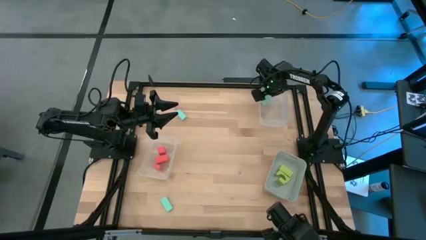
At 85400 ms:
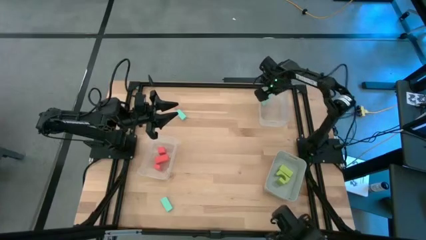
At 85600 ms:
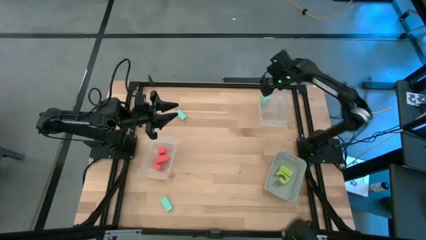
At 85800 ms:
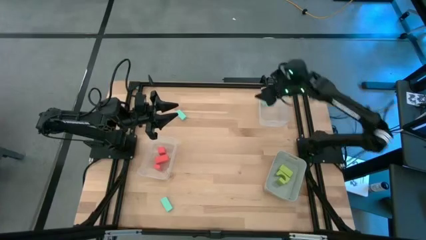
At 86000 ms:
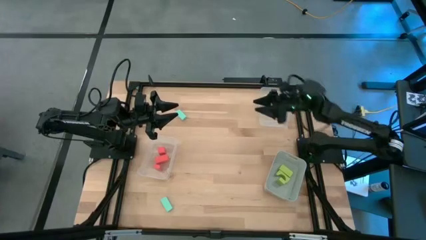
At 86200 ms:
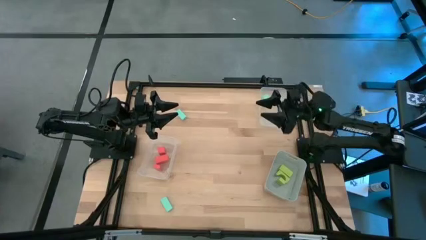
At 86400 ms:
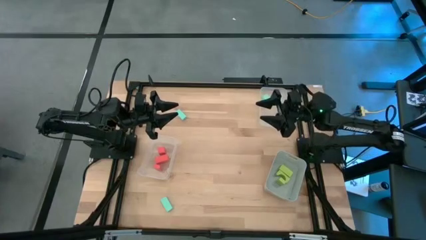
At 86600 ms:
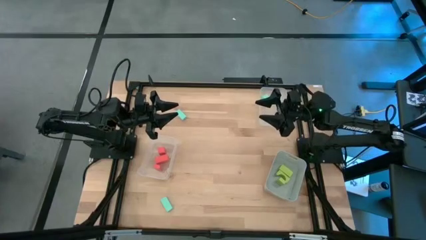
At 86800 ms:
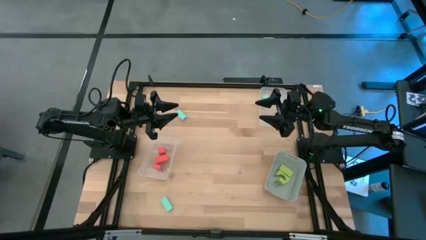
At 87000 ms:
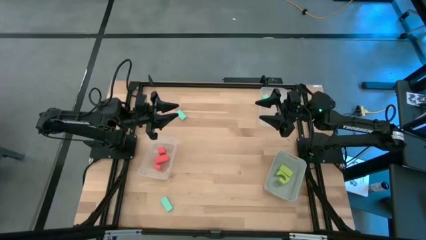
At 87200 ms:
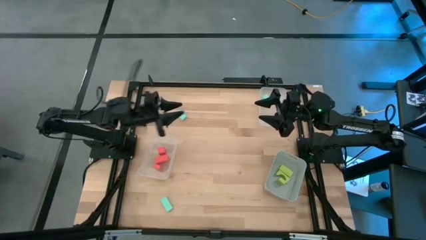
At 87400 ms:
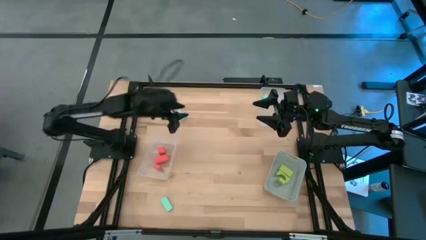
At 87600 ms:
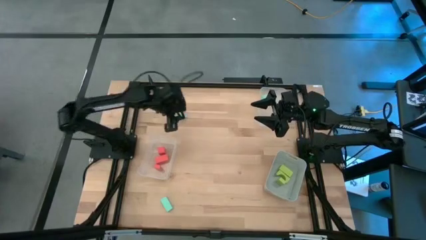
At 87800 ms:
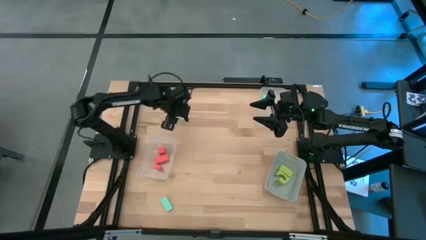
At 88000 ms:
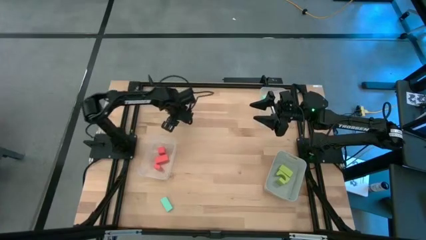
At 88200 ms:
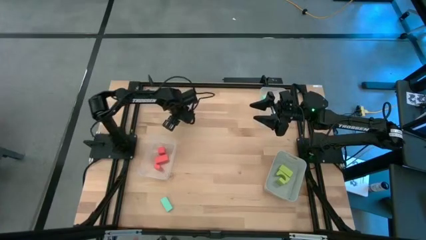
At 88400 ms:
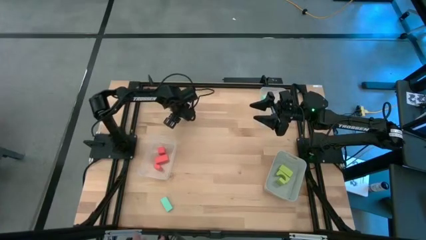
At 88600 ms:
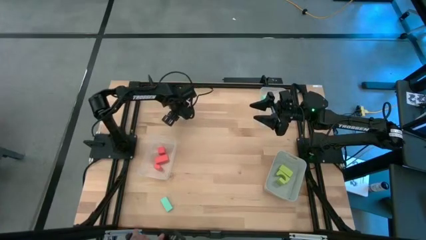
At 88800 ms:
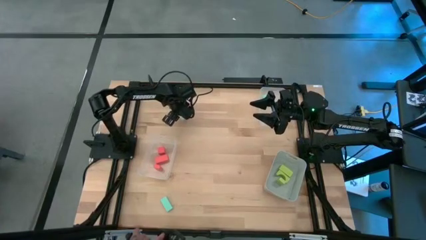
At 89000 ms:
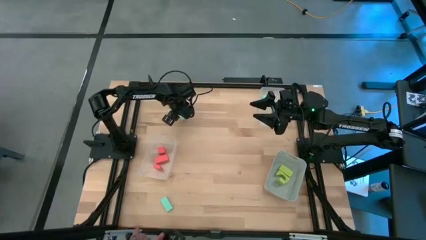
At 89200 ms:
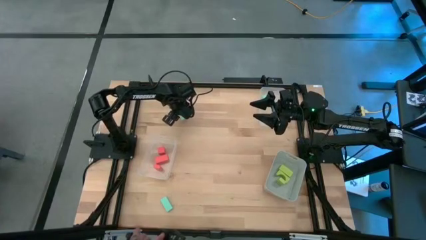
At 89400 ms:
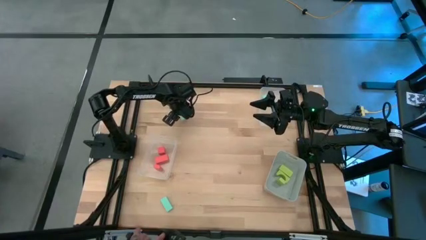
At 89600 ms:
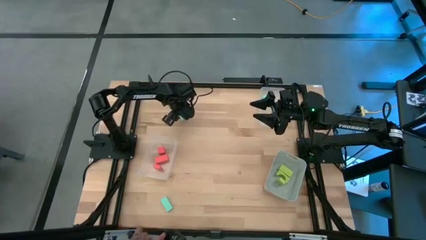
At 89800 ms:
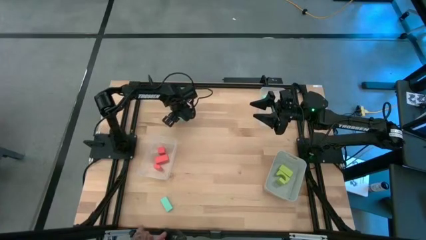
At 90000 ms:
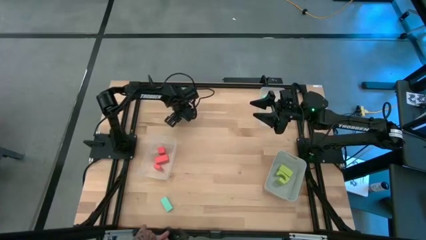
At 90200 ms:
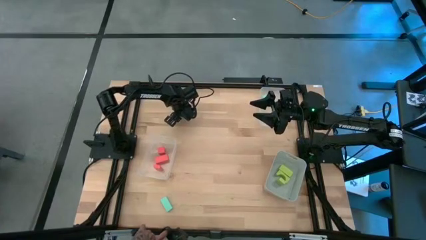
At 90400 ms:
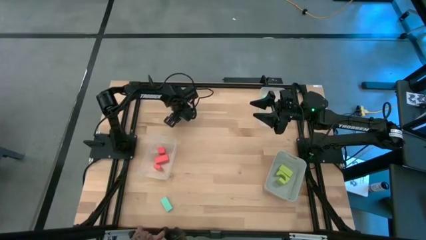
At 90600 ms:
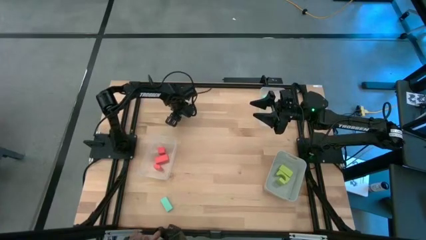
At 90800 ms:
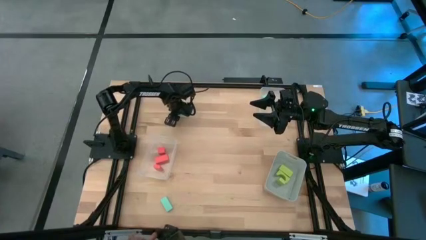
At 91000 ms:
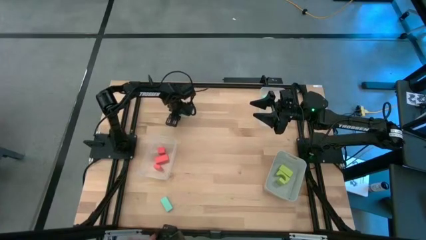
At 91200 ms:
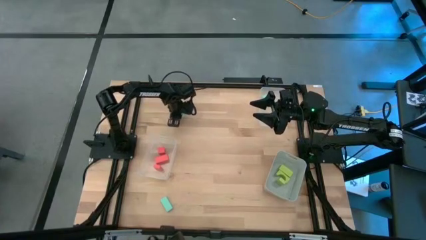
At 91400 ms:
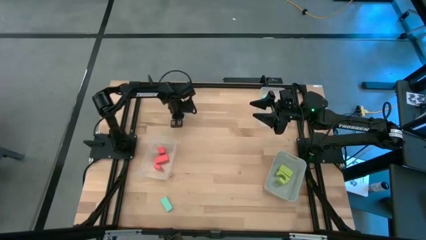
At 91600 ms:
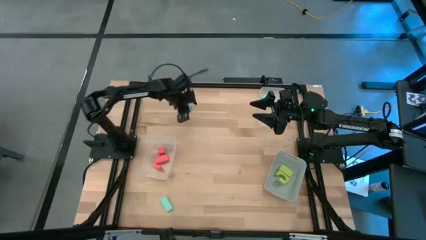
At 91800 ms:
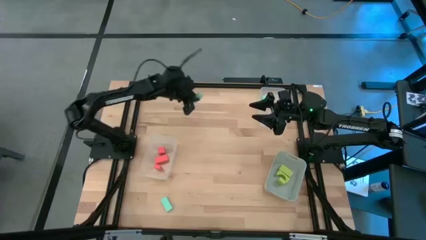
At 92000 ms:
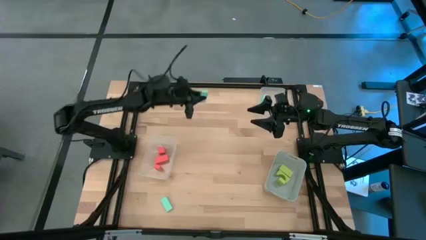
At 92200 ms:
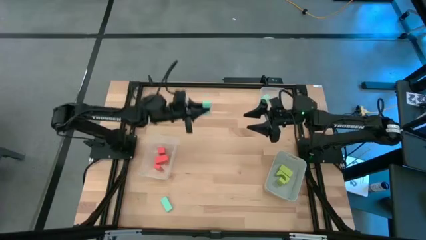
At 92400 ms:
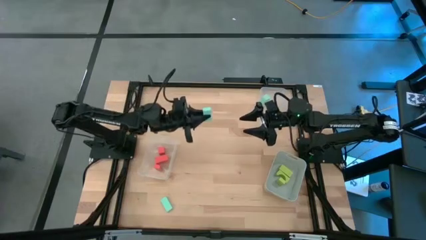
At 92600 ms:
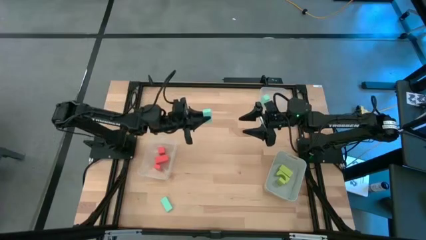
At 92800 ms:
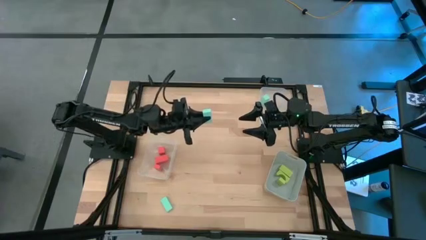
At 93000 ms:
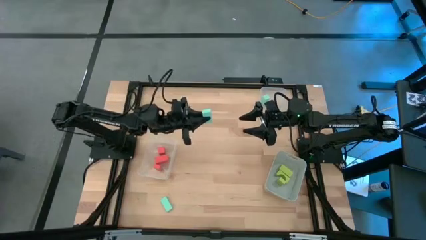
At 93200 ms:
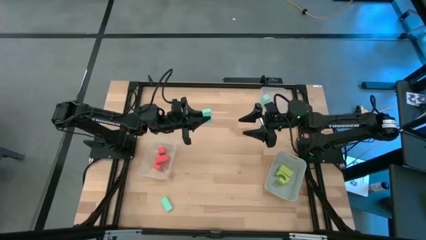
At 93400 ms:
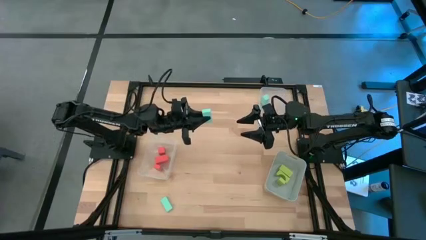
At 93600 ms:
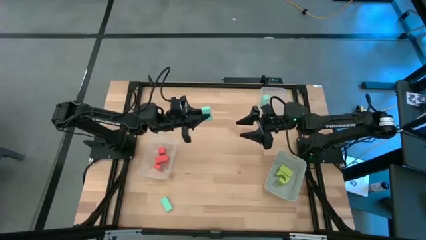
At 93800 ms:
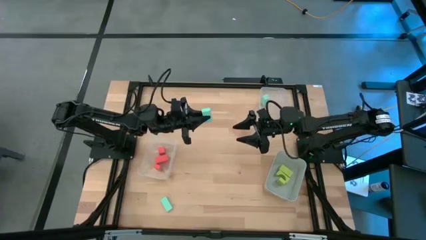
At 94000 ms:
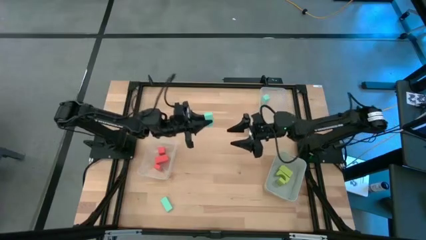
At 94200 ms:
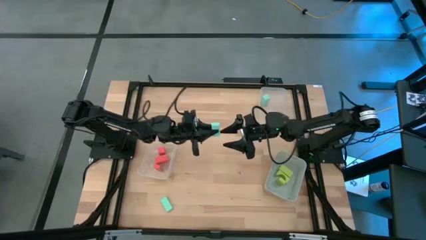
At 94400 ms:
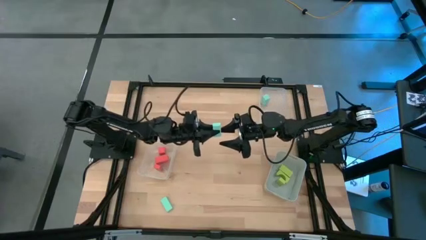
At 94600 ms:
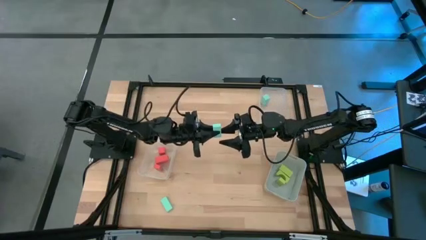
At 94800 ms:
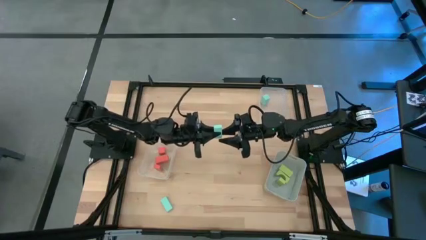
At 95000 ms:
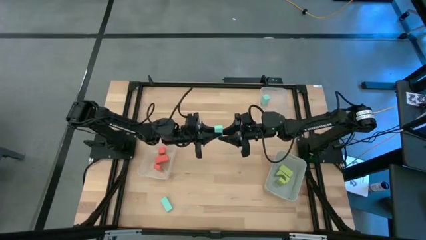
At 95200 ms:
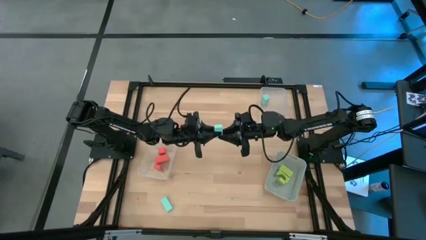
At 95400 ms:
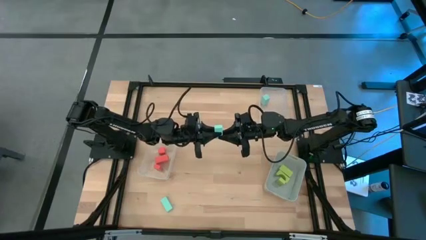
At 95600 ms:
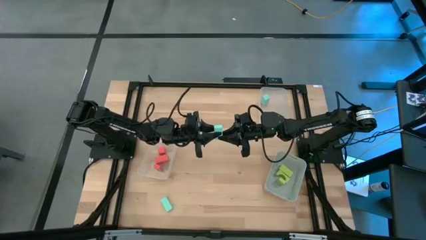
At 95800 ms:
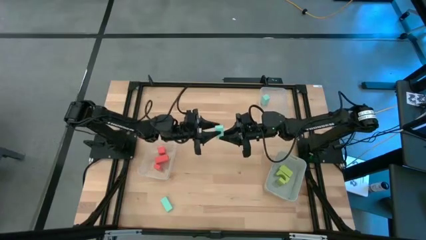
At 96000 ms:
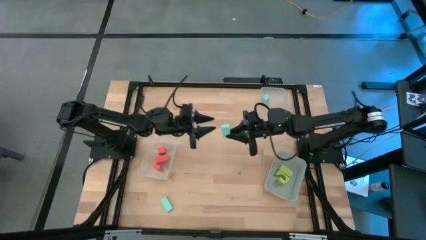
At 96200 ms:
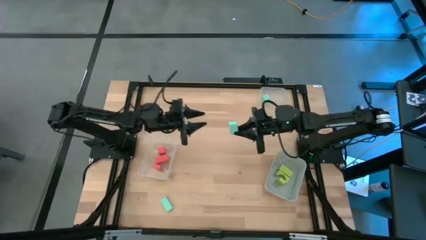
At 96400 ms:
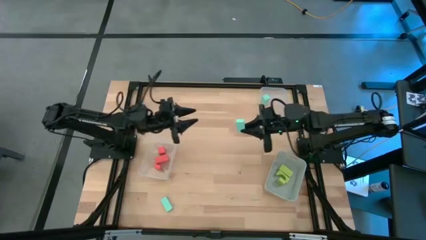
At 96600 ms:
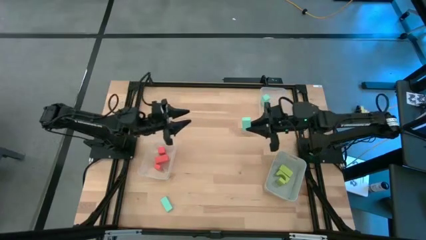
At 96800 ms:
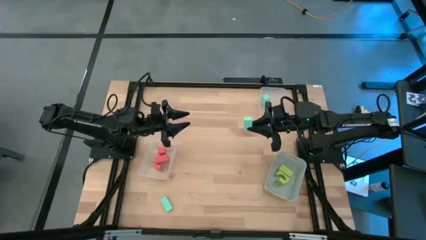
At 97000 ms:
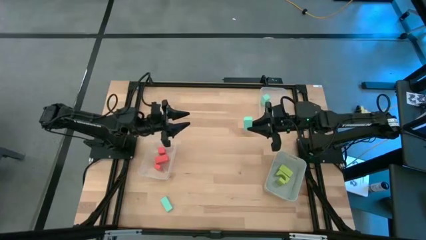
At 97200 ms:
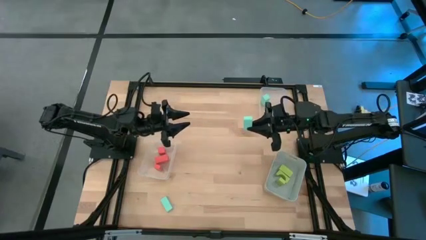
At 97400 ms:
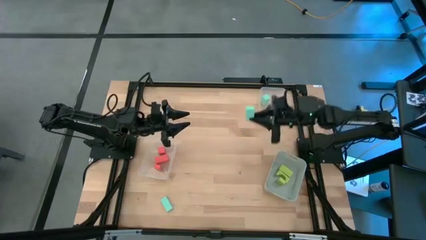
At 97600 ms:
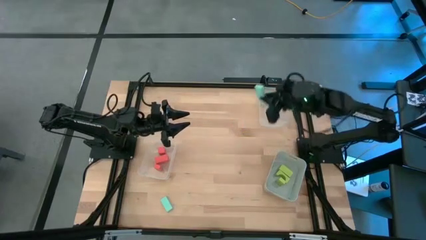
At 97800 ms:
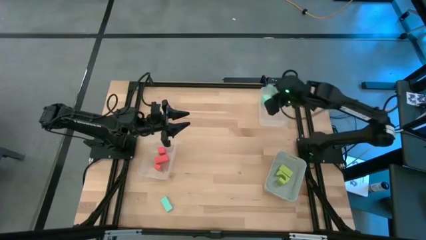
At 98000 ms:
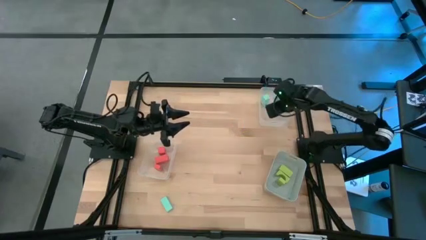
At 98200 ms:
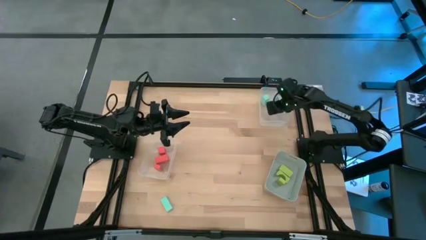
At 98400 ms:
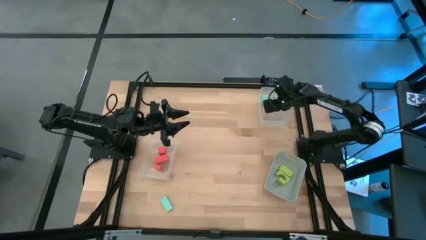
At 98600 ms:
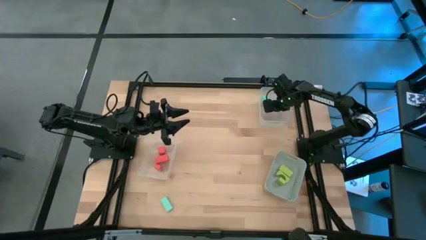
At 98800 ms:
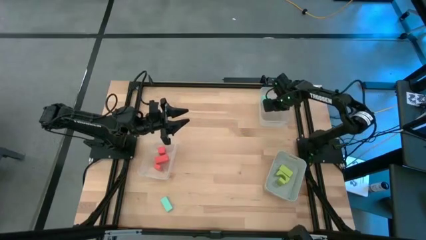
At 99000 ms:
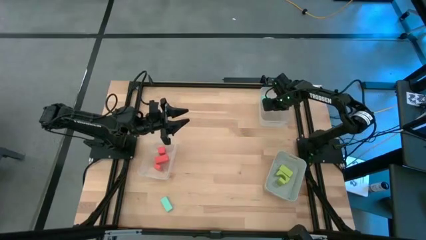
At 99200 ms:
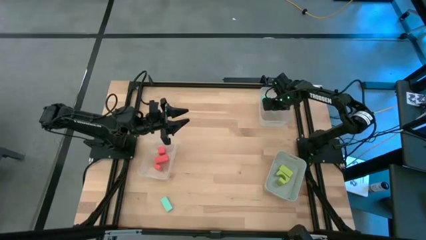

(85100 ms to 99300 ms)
Task: Sort & place blocks by color
Put the top light blue block into the top transparent bin

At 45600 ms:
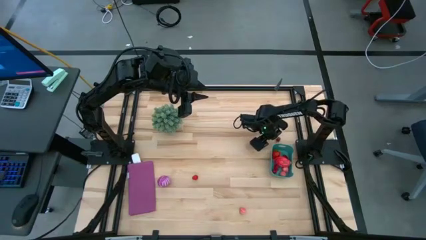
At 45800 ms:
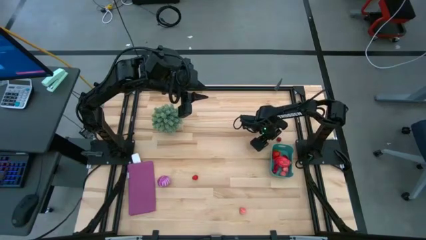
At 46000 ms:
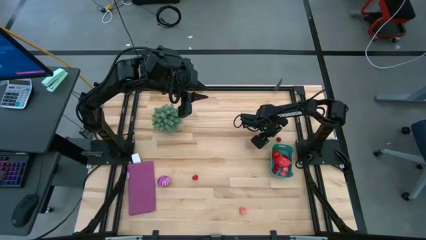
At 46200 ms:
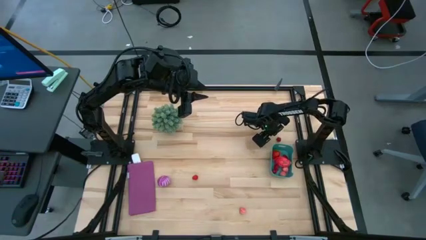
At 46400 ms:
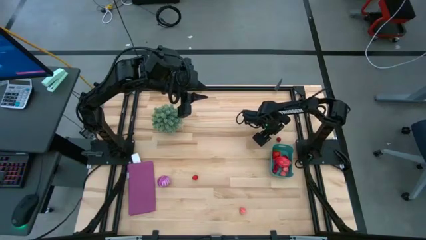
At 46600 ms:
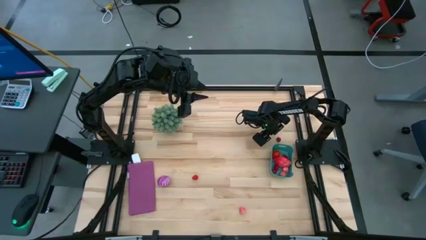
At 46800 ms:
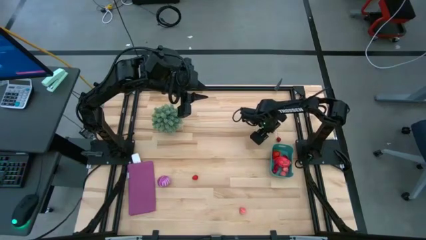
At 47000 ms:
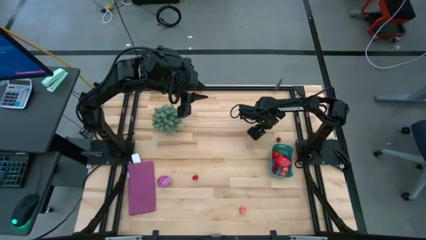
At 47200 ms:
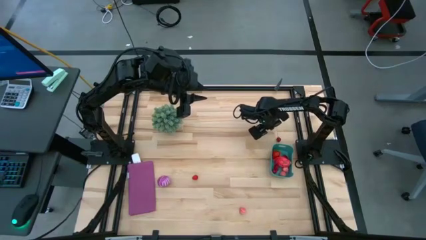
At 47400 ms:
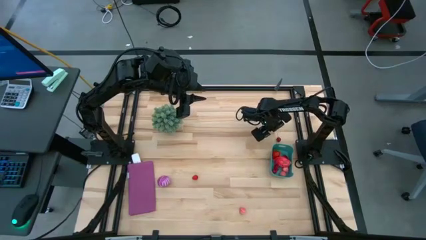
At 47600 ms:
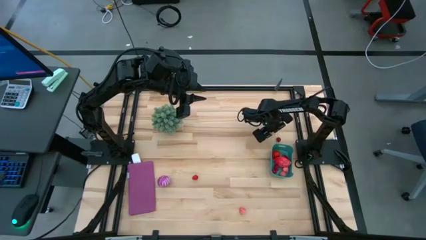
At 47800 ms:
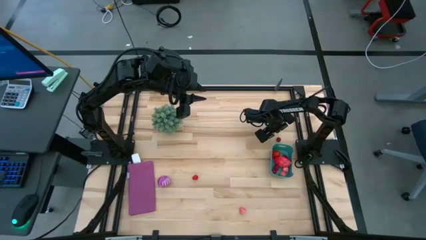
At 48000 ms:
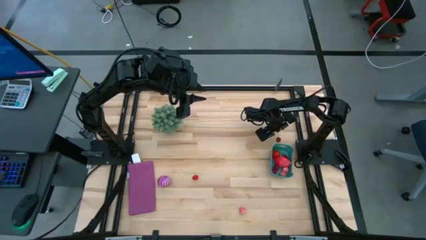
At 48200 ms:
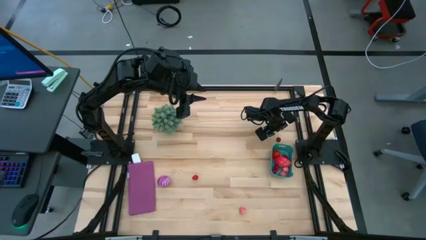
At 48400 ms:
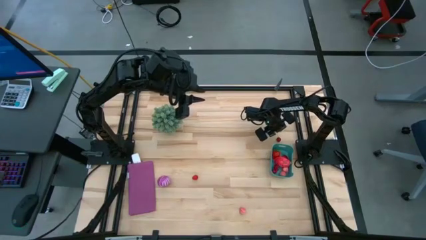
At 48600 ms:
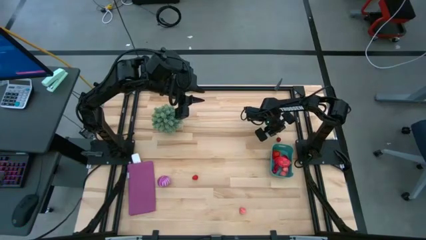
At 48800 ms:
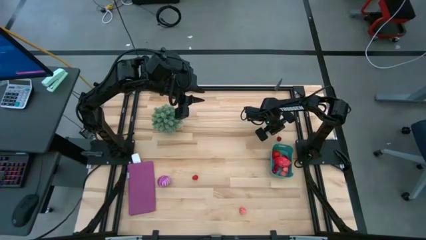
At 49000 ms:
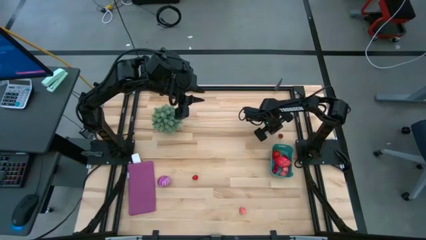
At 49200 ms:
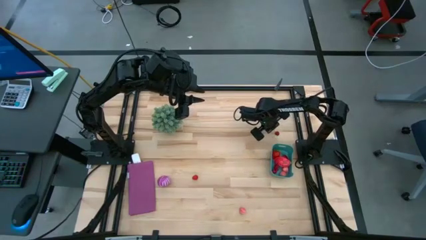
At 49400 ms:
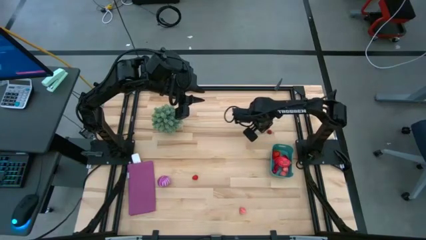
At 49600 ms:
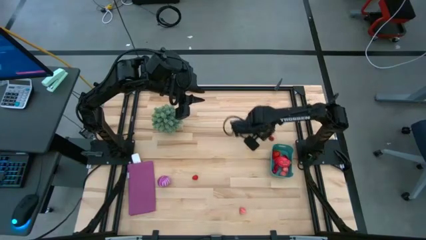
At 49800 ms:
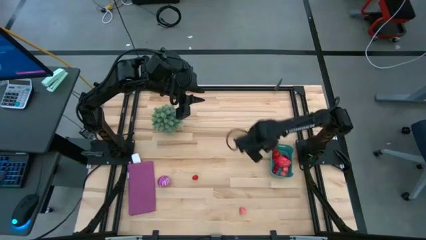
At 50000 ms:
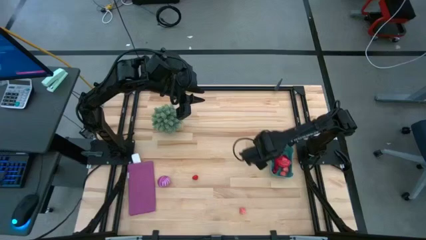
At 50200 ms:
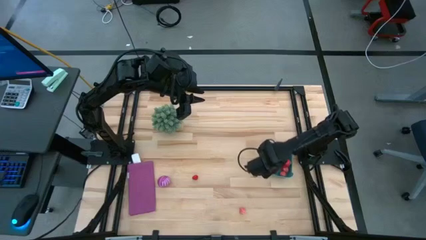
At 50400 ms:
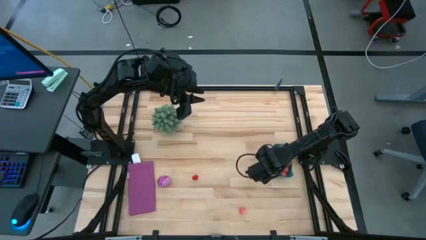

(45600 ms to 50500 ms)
Task: Pick and placing Produce into tupperware
Put the red cherry into the green bin
